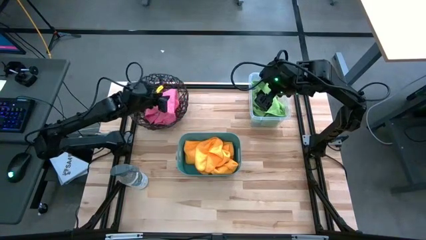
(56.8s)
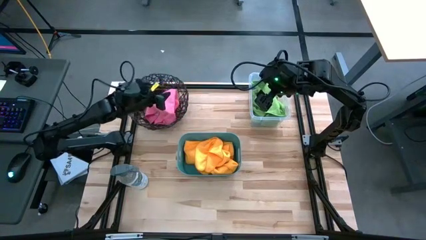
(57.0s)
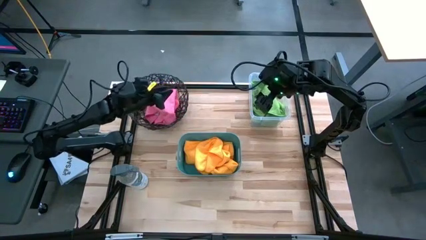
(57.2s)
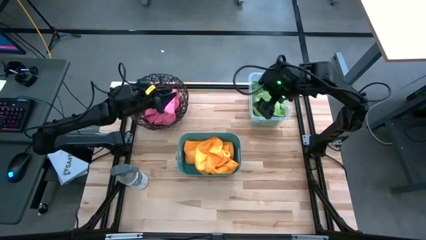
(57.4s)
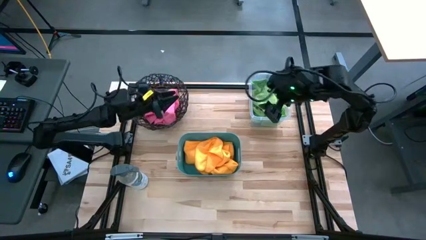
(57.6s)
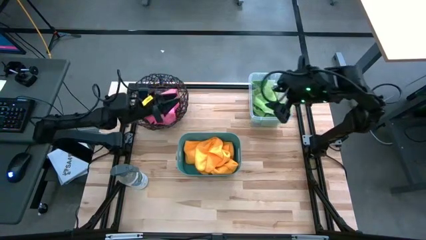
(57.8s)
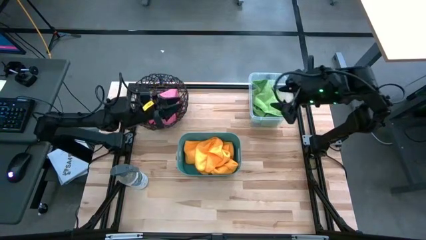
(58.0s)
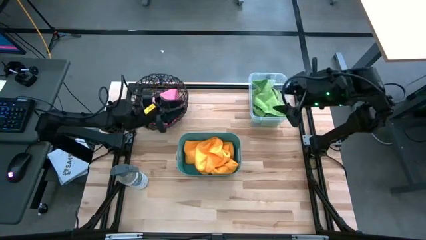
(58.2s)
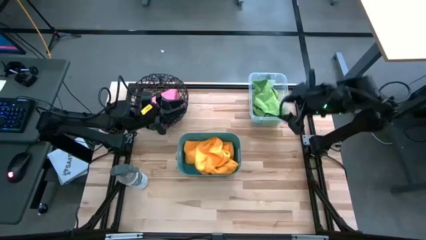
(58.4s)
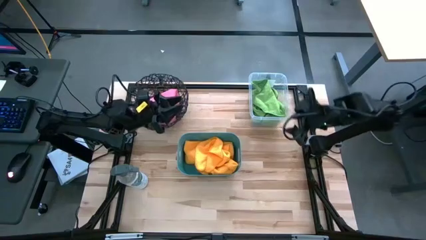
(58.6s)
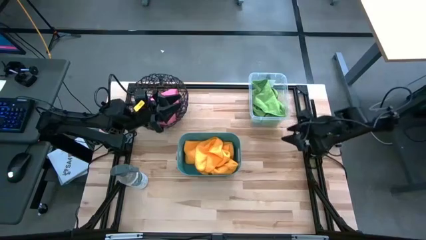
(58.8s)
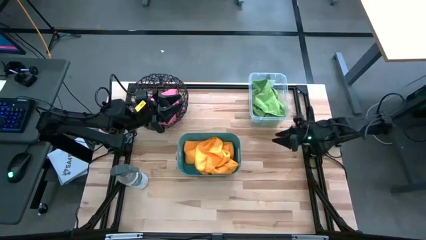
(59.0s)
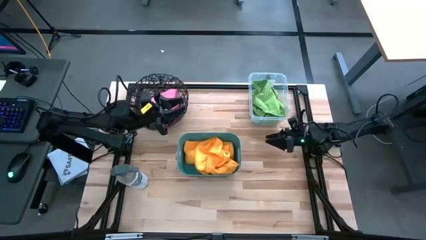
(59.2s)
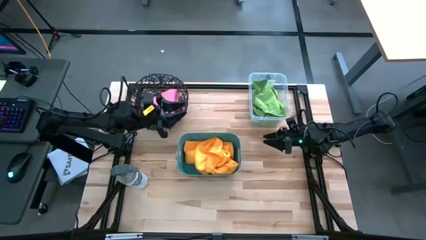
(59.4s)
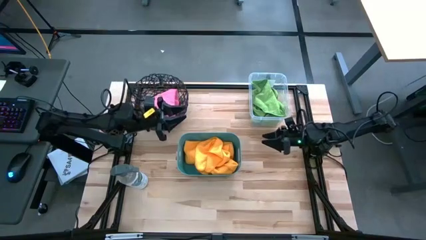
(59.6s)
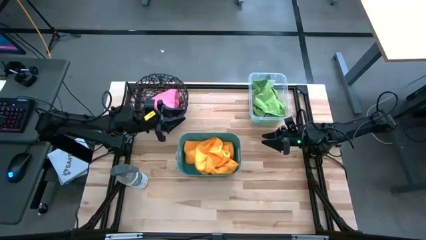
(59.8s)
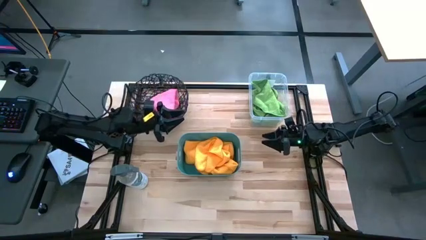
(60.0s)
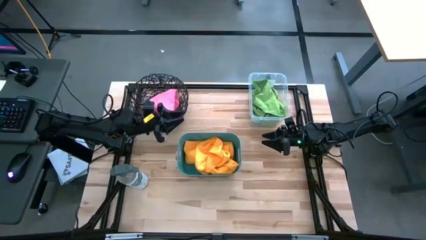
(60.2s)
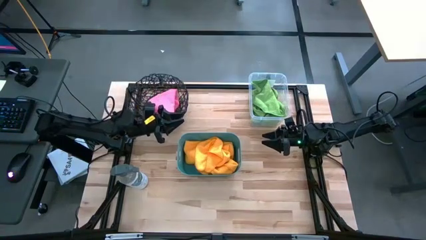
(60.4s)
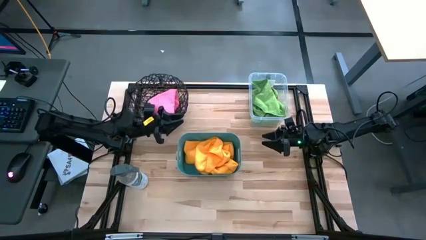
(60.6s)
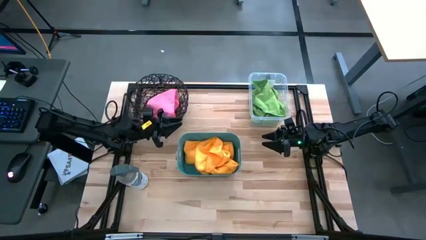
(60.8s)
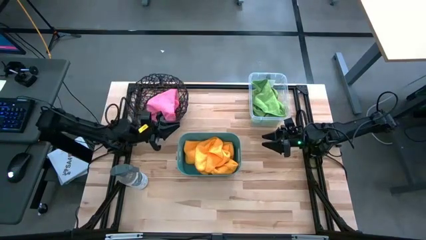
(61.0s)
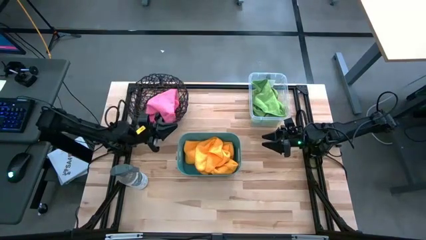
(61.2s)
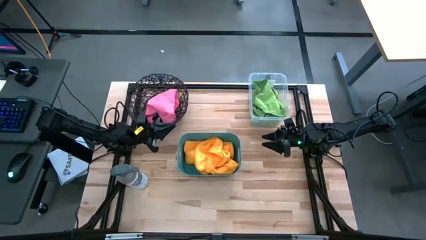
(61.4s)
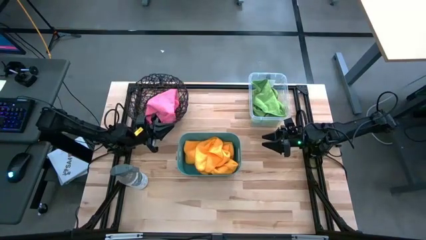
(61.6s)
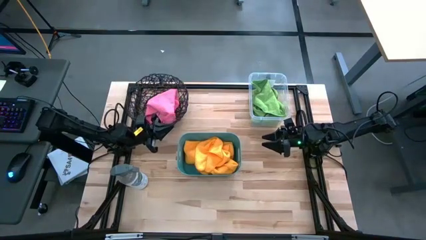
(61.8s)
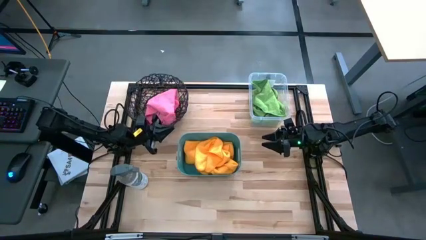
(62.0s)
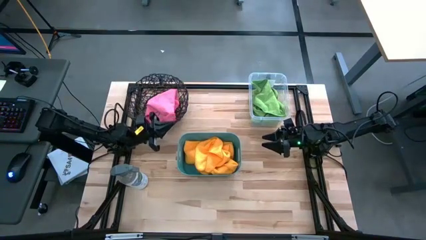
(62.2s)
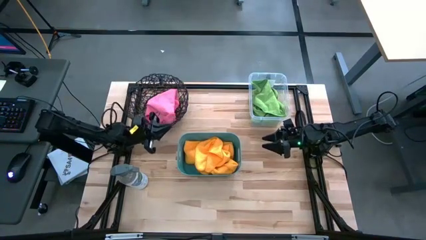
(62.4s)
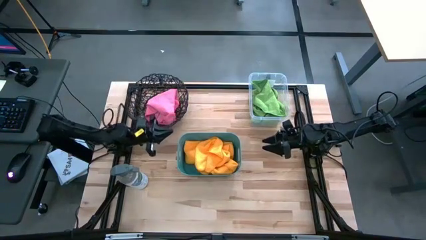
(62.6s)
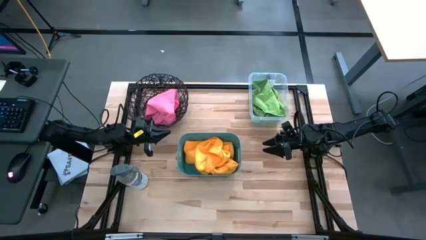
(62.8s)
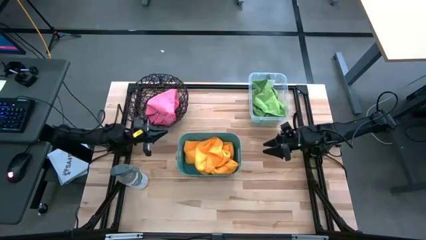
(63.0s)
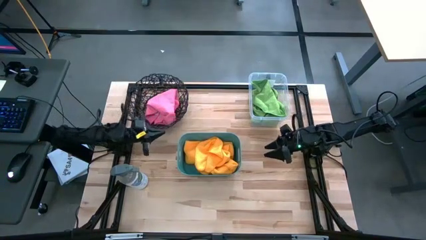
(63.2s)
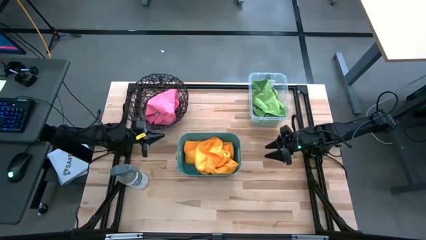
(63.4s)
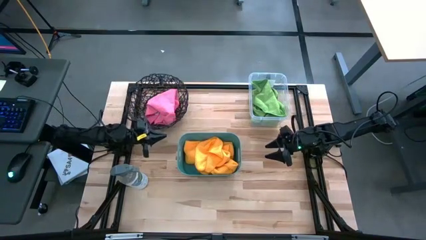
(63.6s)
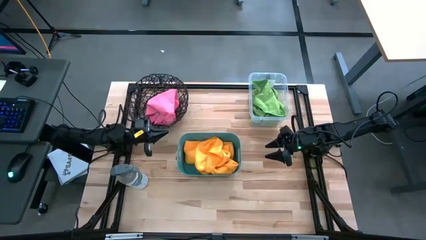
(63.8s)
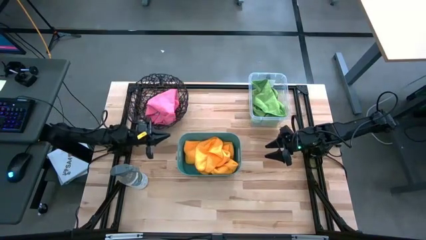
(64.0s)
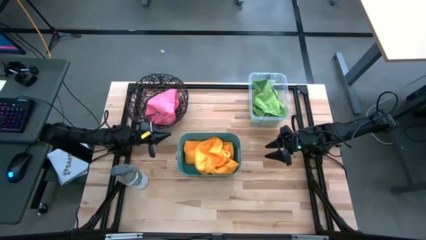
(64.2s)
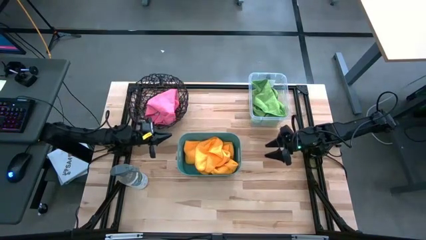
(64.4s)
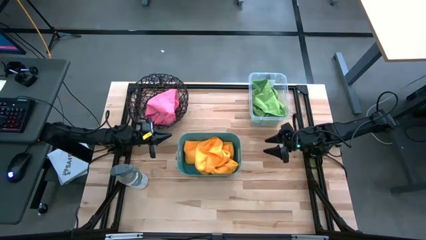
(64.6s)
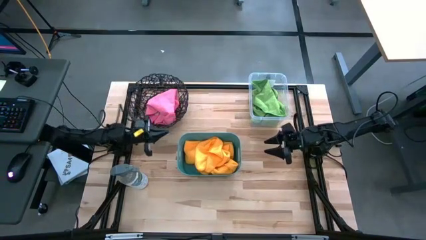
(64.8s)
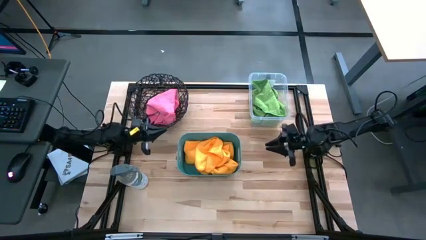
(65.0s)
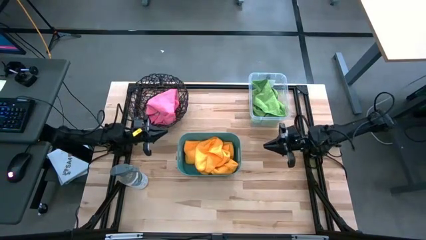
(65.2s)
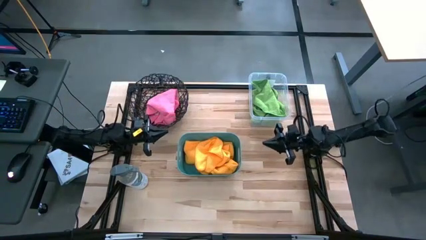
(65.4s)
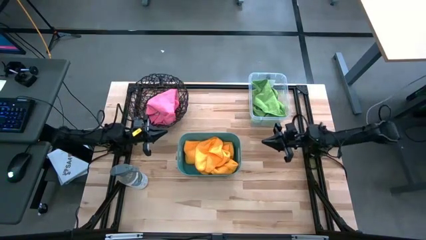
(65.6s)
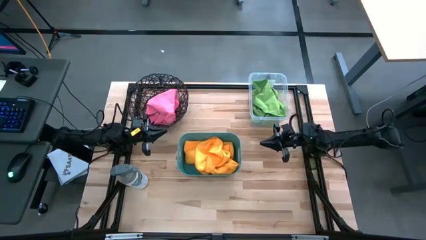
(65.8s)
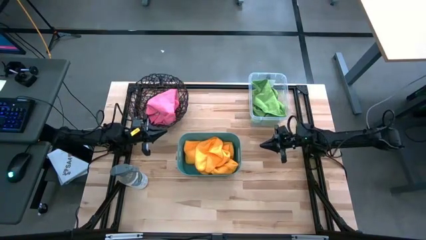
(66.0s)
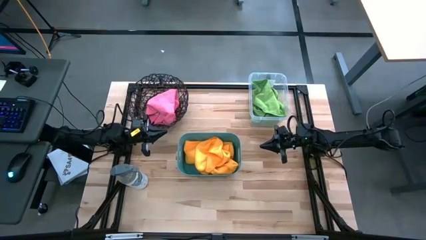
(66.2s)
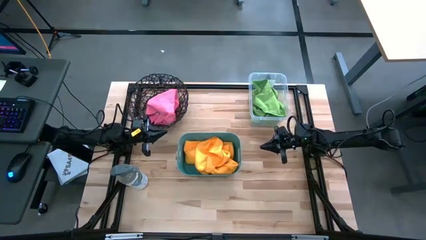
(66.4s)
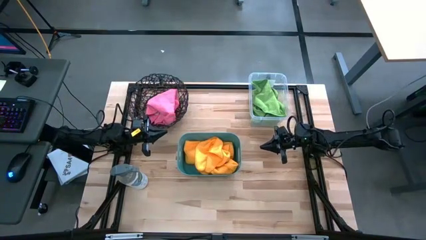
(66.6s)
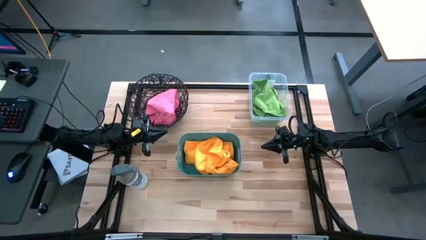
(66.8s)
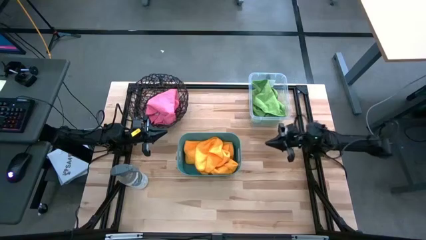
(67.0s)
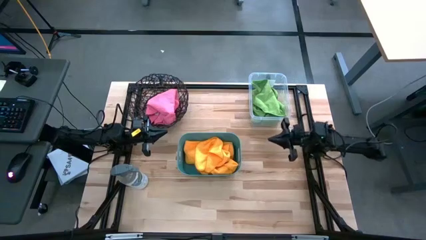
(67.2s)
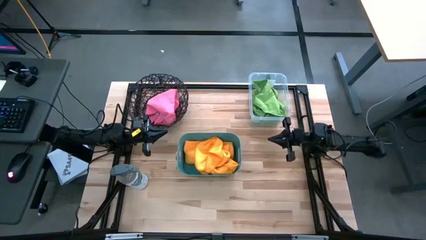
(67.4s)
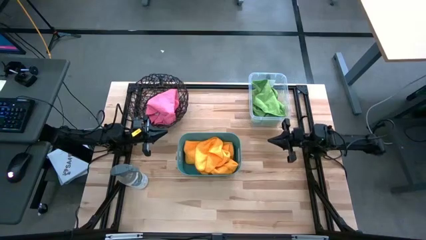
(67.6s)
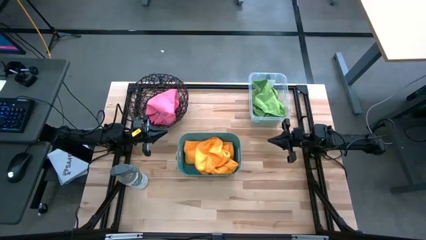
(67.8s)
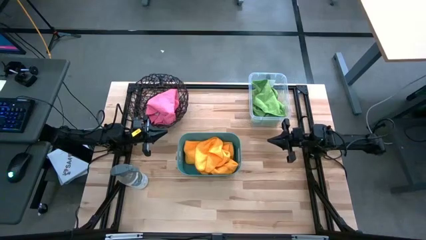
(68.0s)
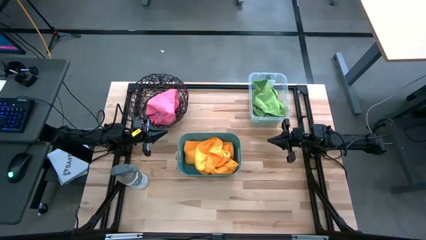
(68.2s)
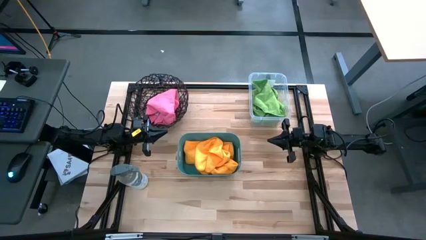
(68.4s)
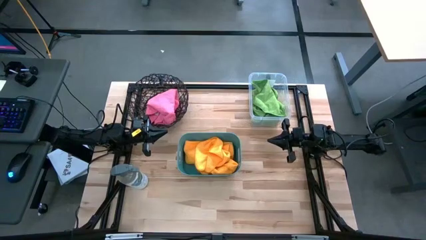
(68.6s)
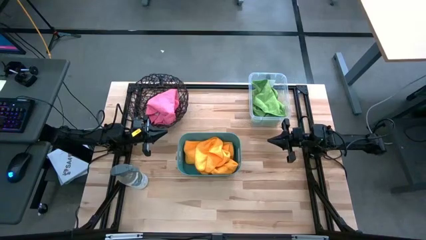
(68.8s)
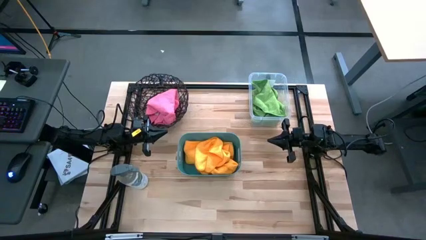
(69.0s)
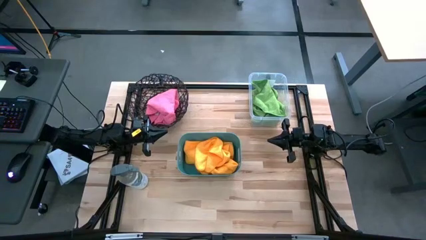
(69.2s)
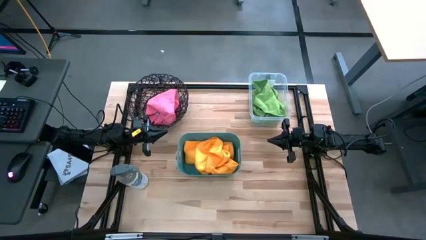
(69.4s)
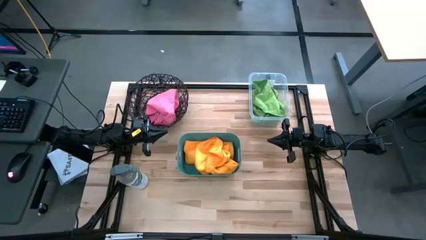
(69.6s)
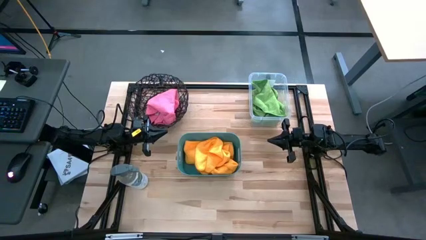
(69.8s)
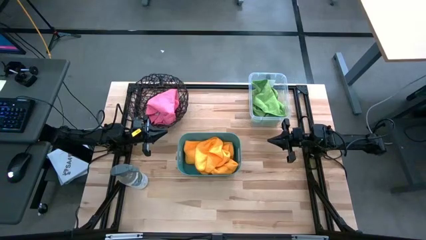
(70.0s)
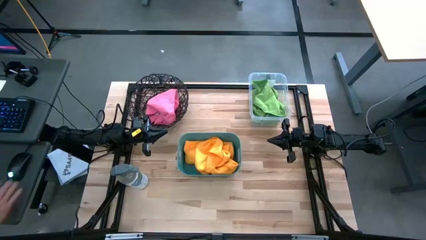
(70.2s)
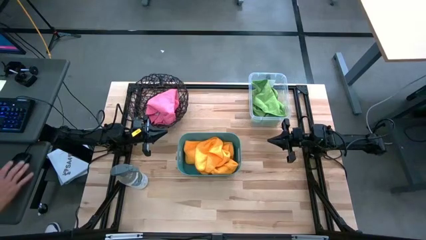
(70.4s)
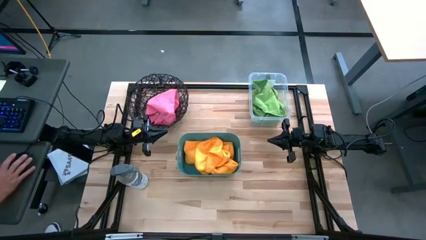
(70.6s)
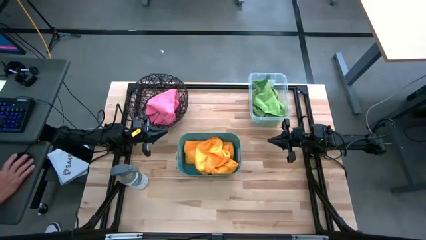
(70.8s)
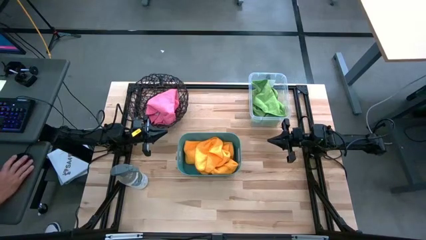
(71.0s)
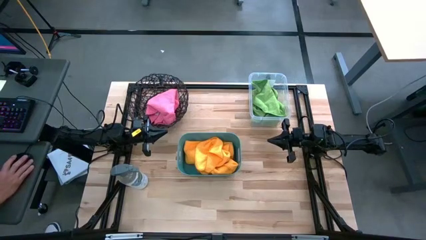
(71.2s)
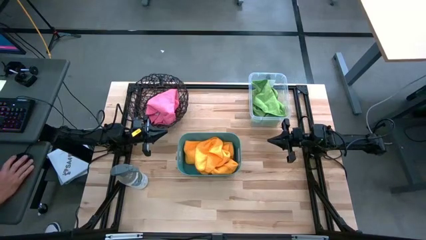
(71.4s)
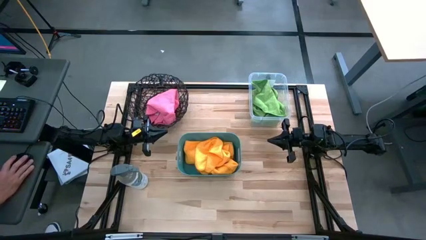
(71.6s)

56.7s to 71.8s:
Task: Sort microfiber towel by color & place in baskets
Return to Home Position
